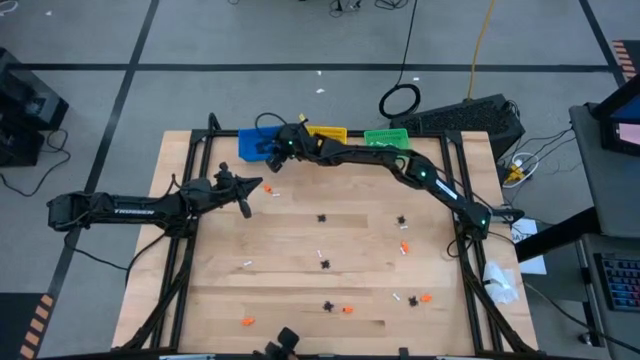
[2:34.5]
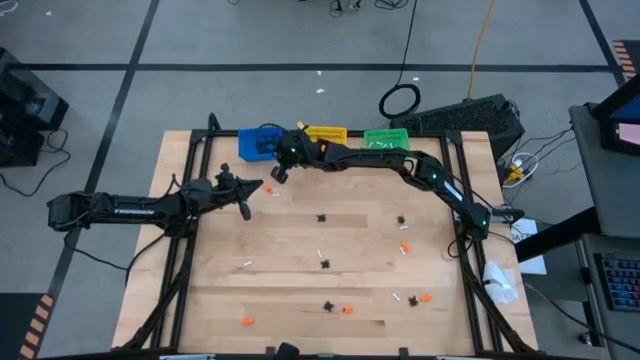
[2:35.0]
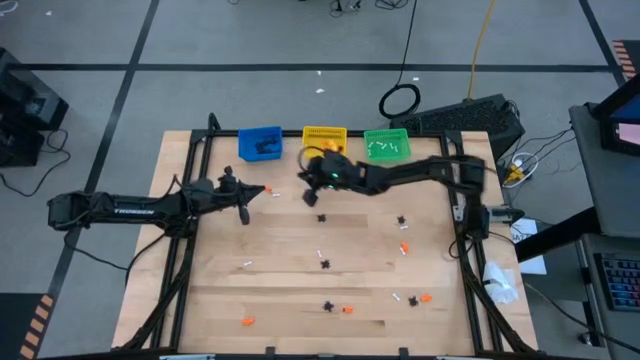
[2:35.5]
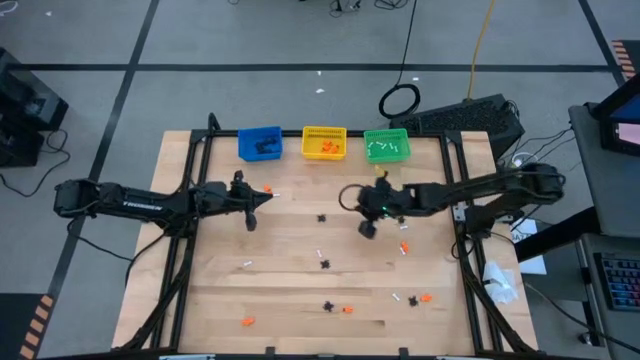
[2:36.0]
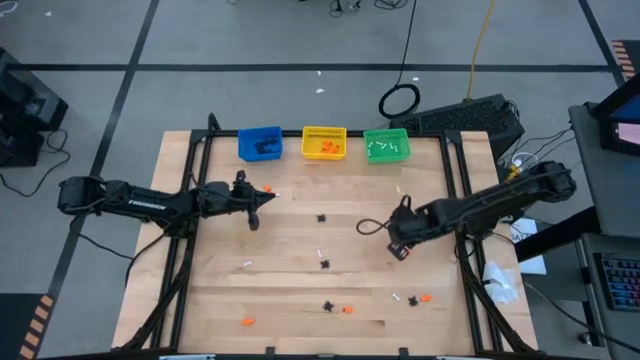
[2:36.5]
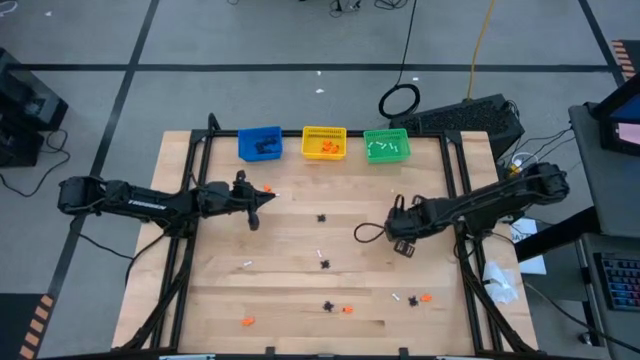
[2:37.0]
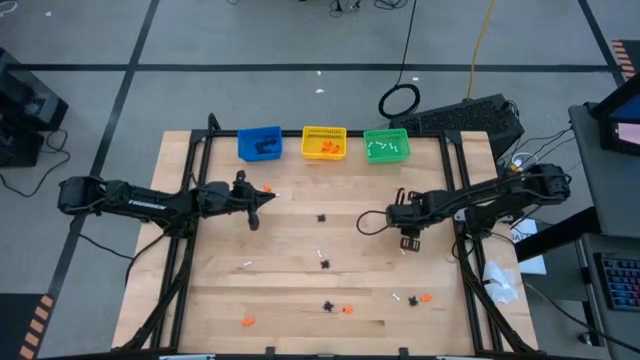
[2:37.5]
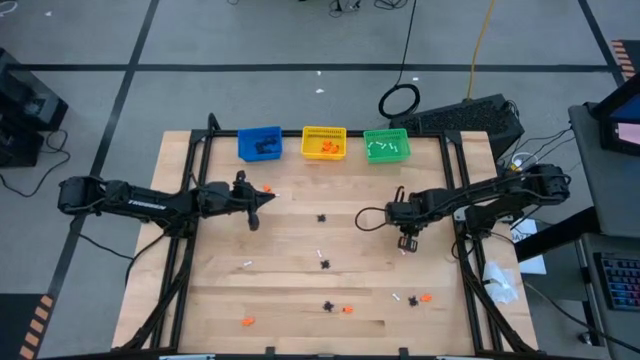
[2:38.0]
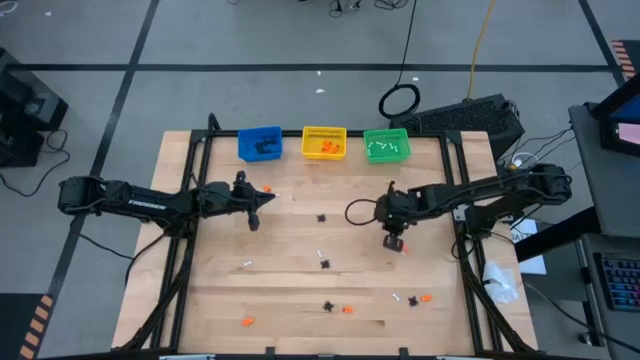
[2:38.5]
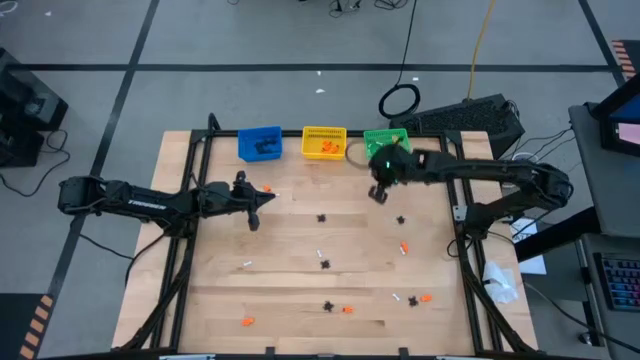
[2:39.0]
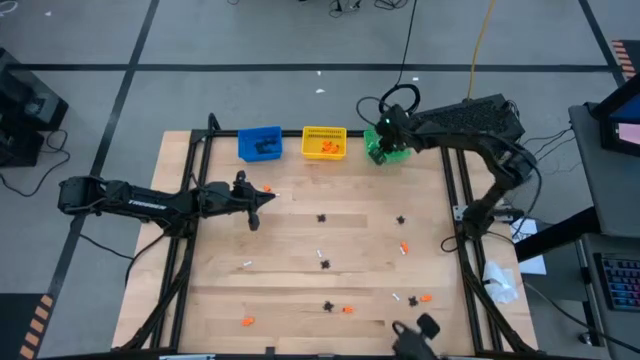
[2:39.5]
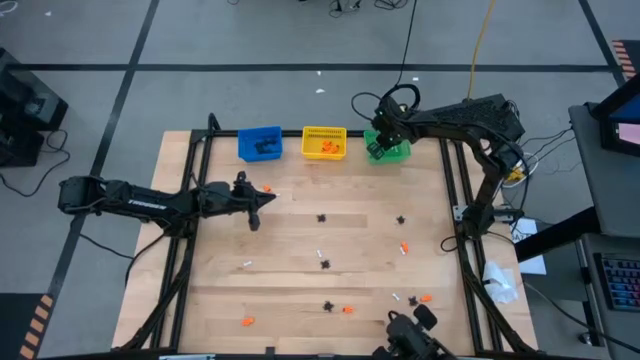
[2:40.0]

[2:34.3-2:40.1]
Task: Sort Halloween decoration
Put the white bone toy into the green bin

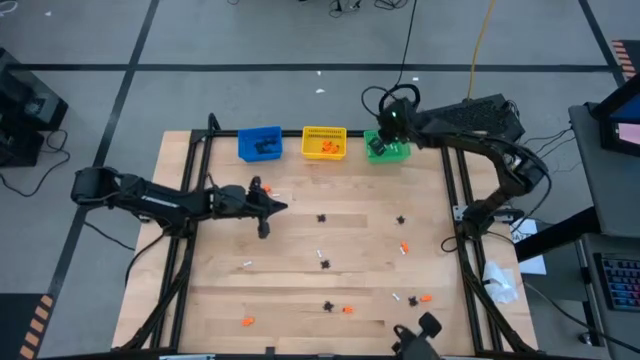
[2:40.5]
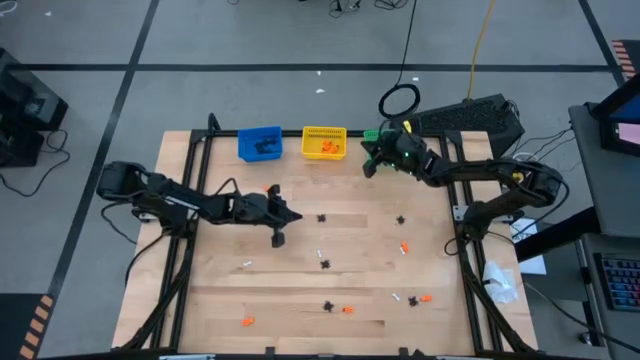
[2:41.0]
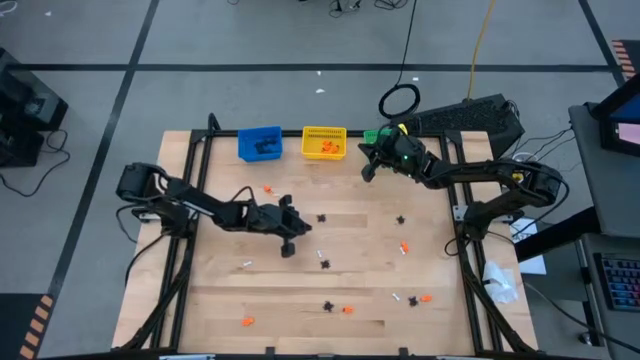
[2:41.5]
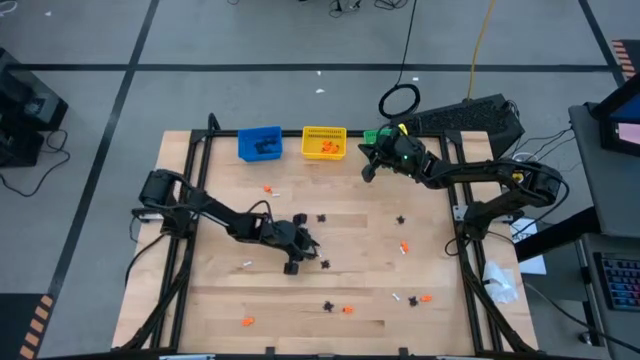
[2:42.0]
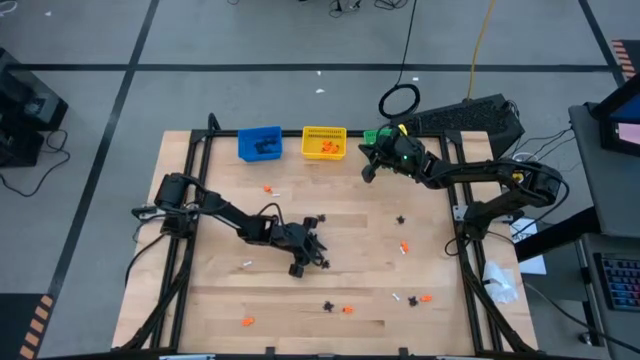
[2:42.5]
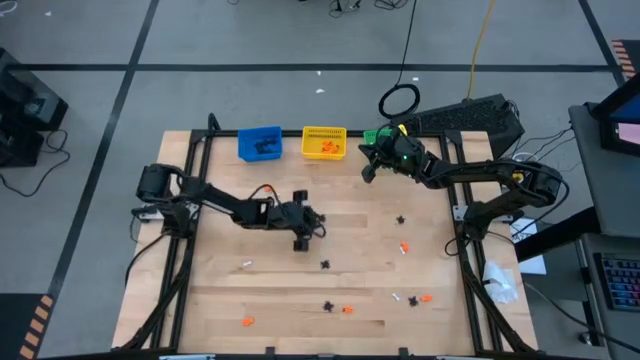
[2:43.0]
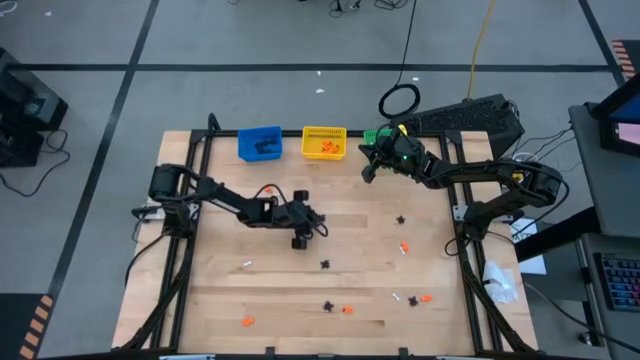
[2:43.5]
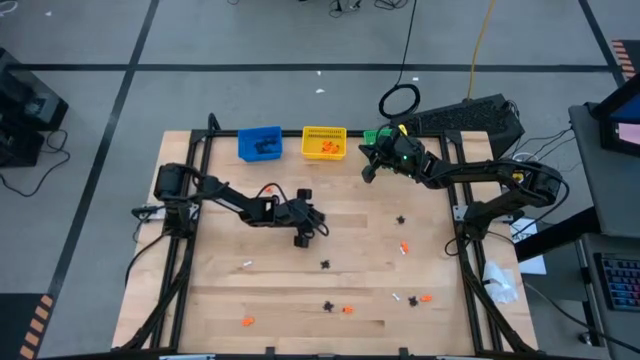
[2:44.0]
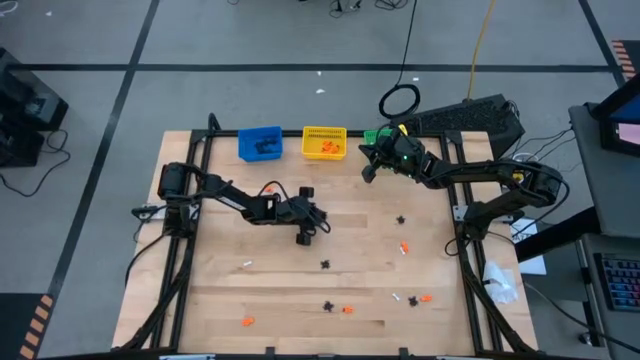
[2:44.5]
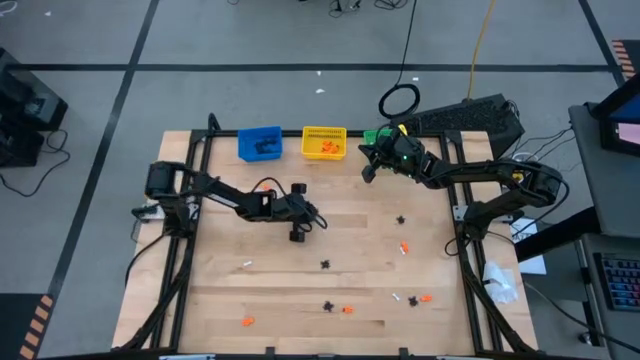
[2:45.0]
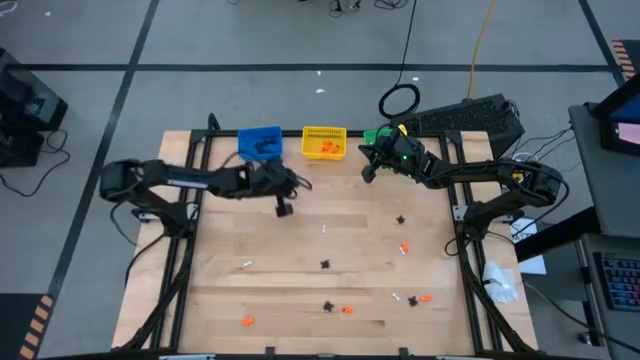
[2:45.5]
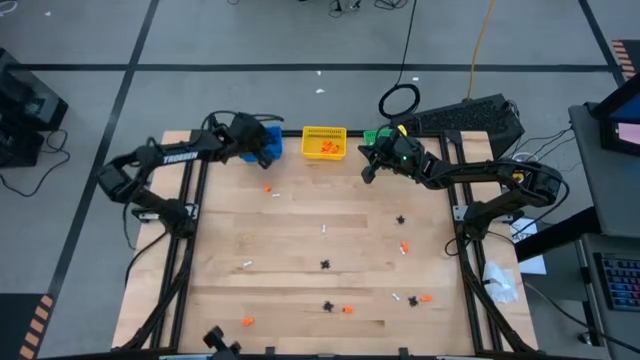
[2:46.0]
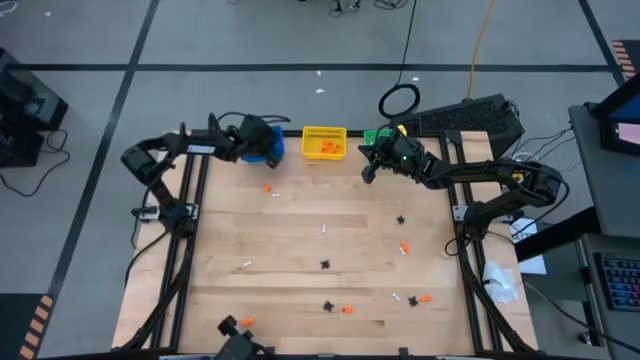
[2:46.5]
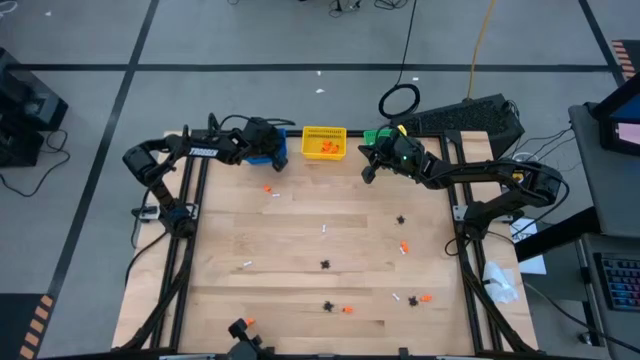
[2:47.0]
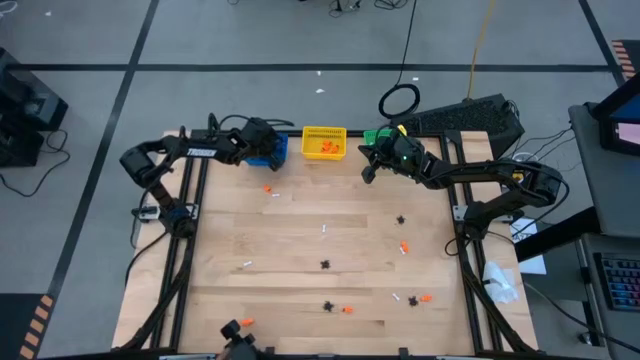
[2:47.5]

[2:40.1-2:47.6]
Put the black spider toy into the blue bin

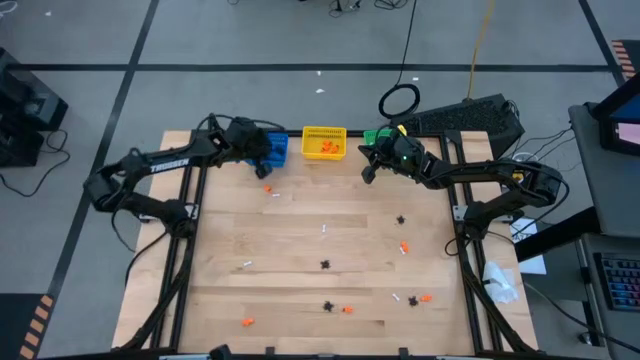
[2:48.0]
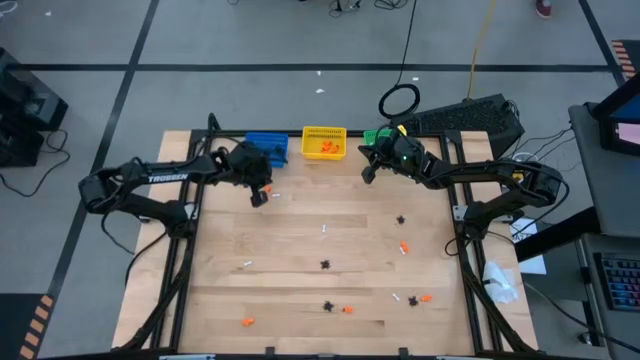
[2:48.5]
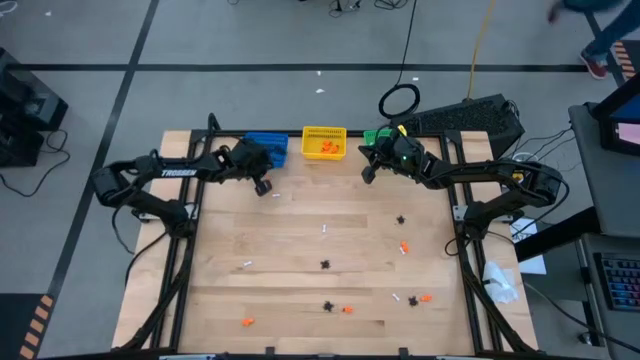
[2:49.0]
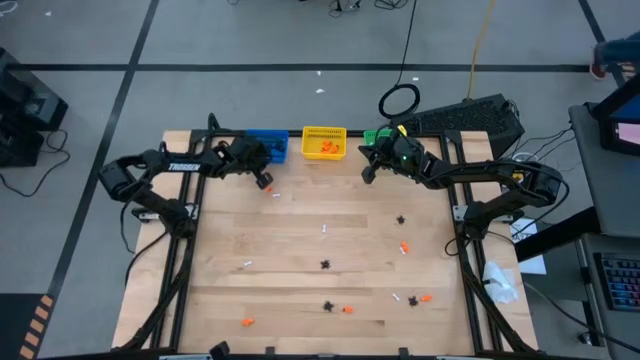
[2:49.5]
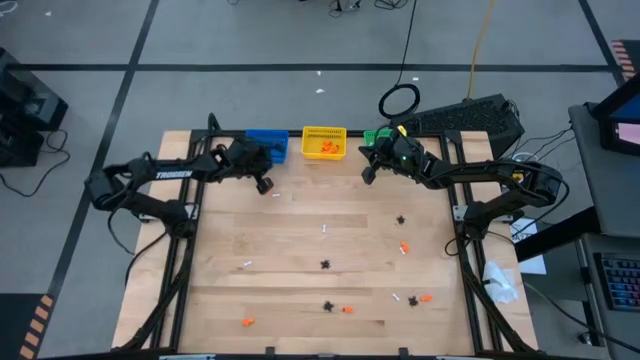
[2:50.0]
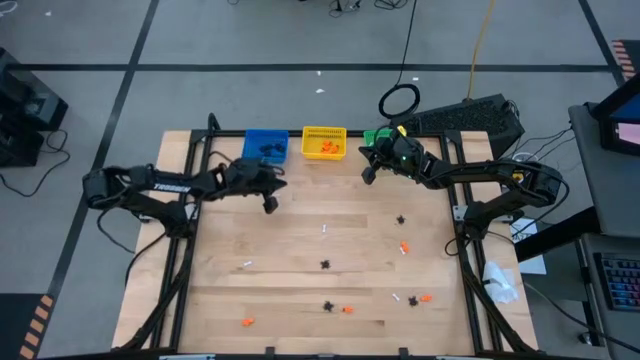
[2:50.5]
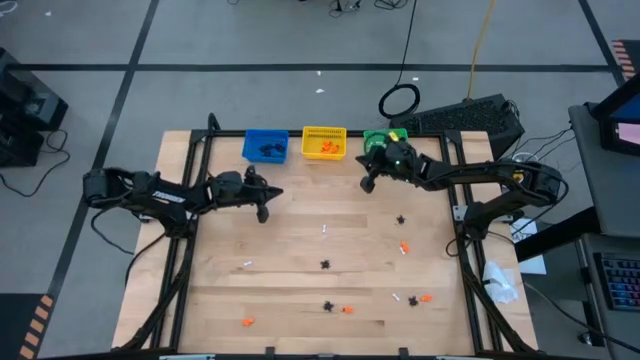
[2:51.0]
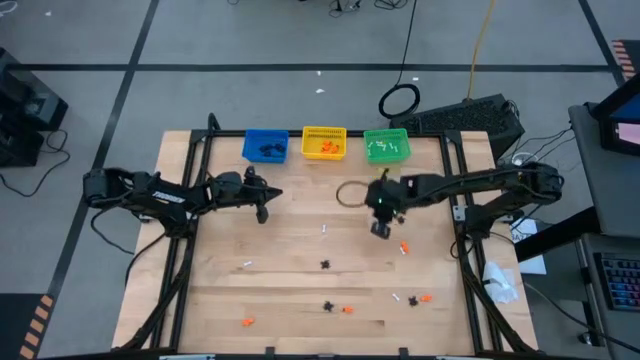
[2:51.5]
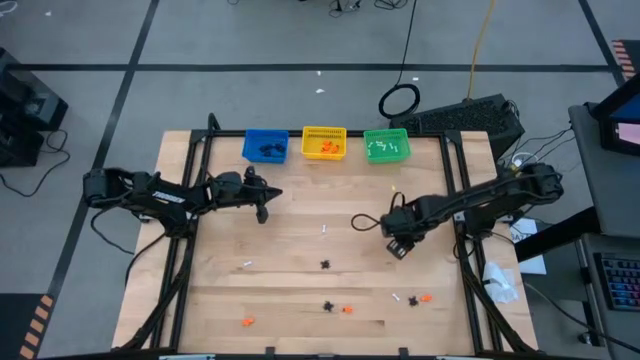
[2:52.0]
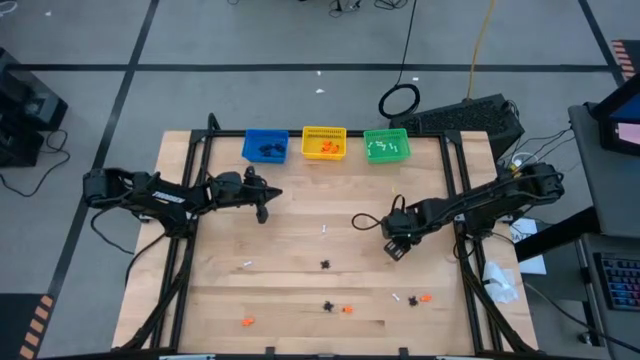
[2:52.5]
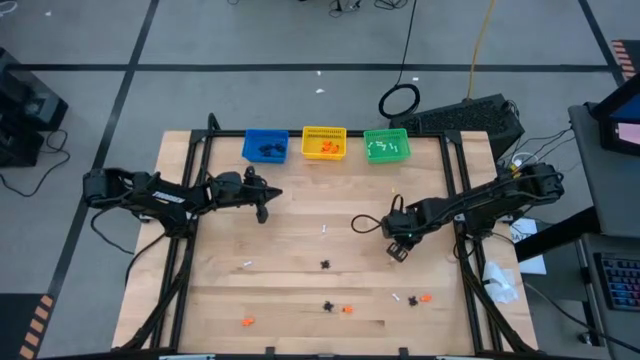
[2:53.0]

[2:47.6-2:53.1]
Put the orange skeleton toy into the yellow bin

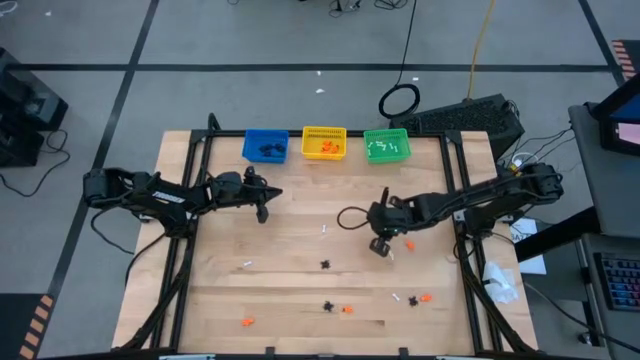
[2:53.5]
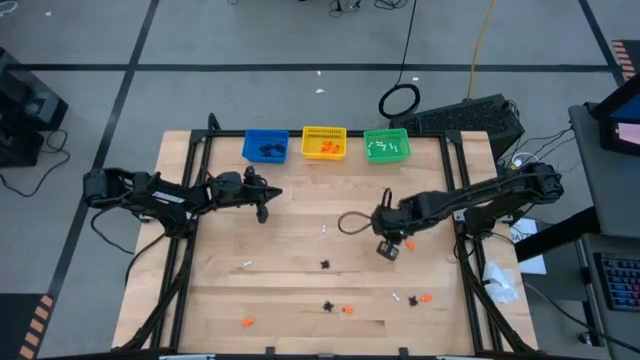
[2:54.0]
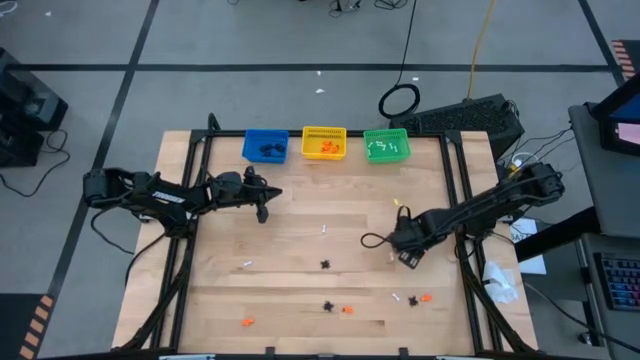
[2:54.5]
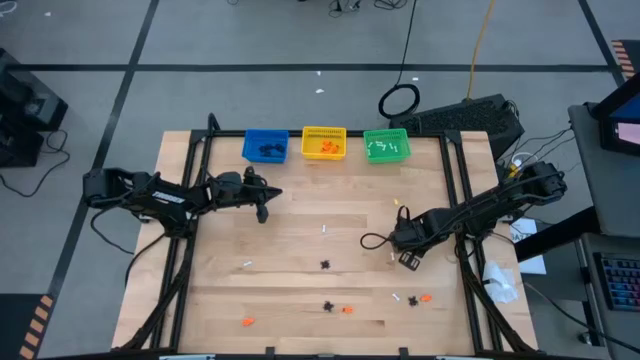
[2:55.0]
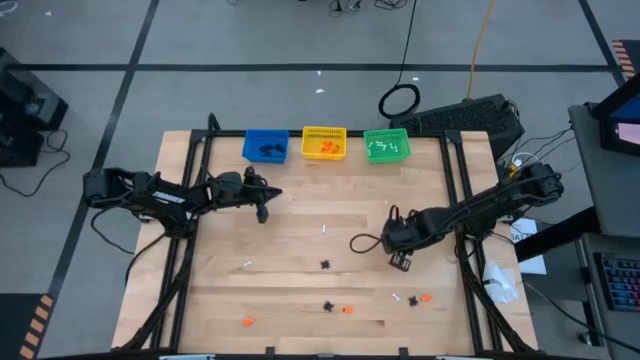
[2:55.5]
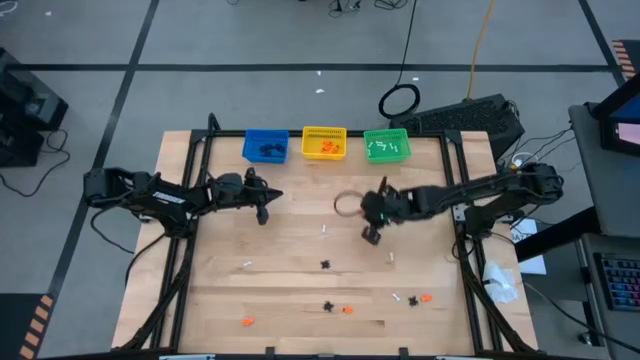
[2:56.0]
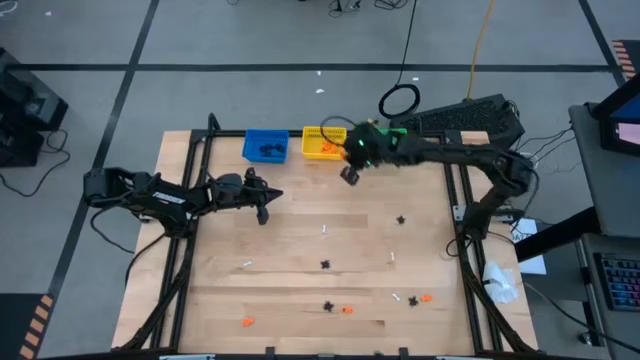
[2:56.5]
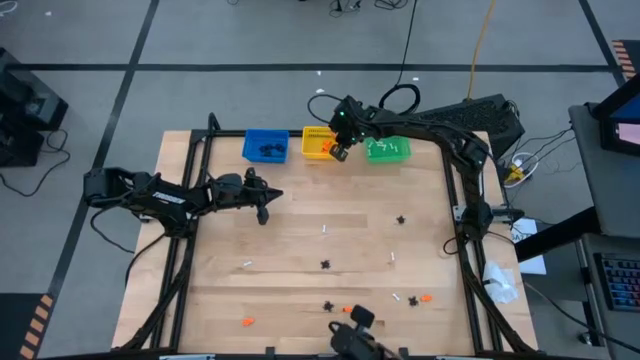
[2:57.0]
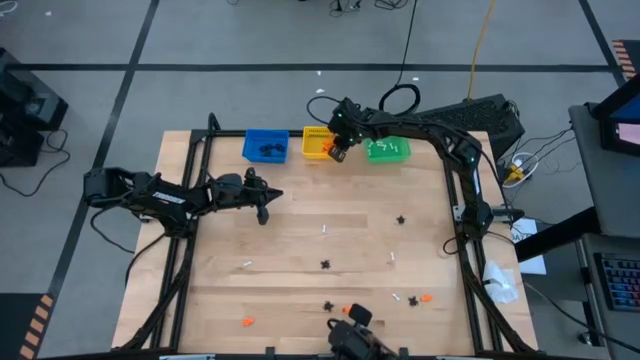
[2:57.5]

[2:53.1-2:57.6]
Put the orange skeleton toy into the yellow bin
